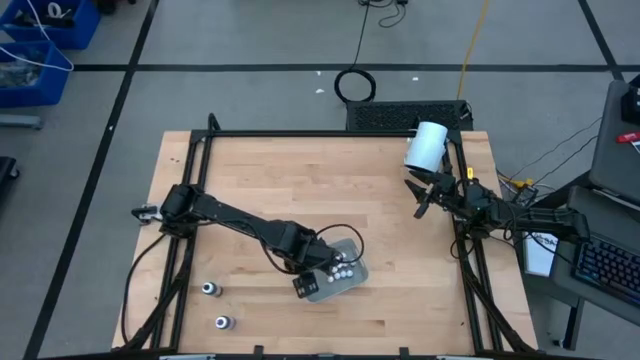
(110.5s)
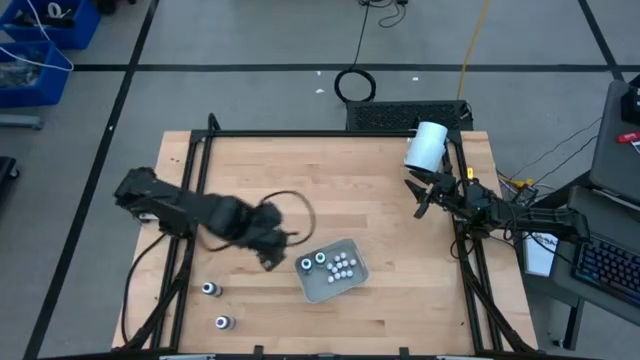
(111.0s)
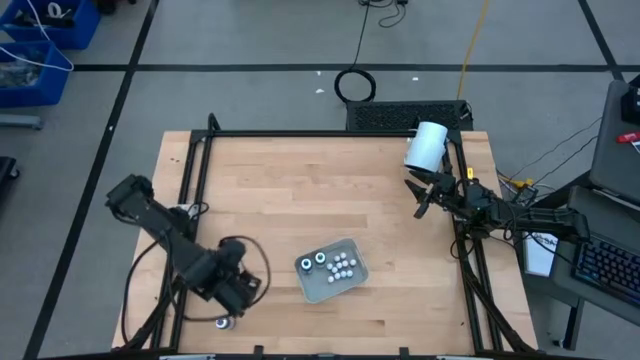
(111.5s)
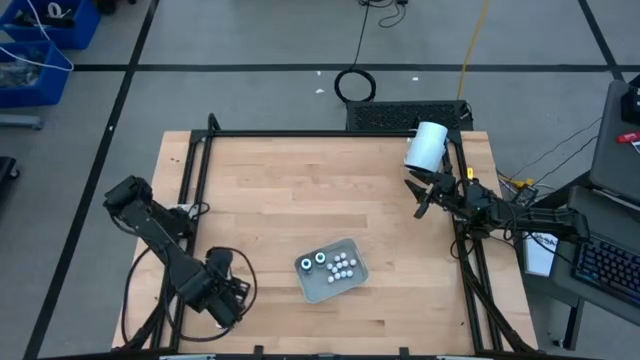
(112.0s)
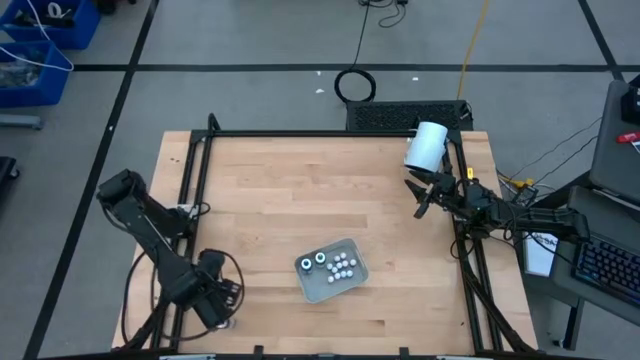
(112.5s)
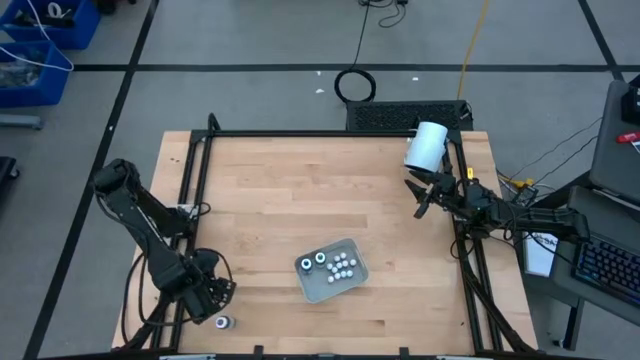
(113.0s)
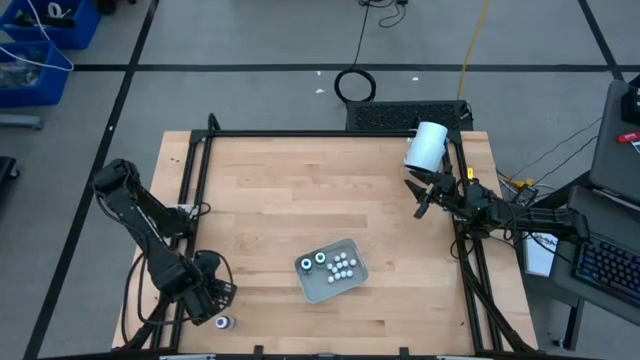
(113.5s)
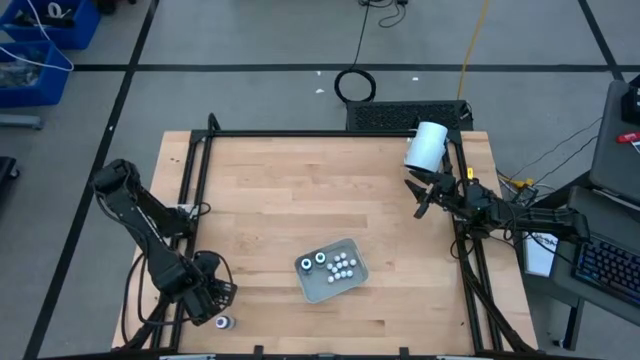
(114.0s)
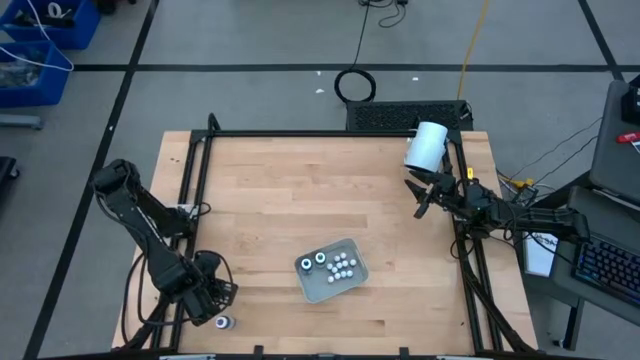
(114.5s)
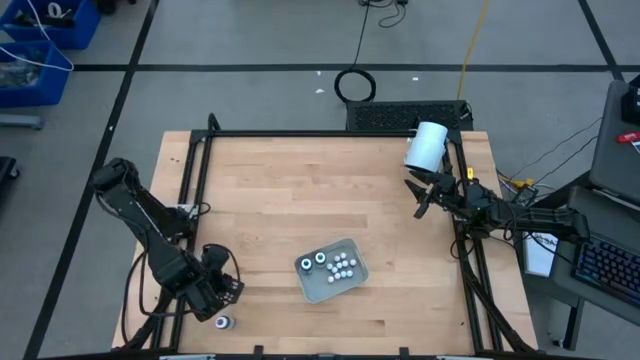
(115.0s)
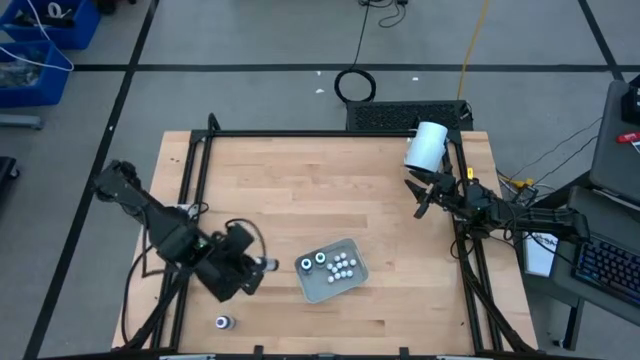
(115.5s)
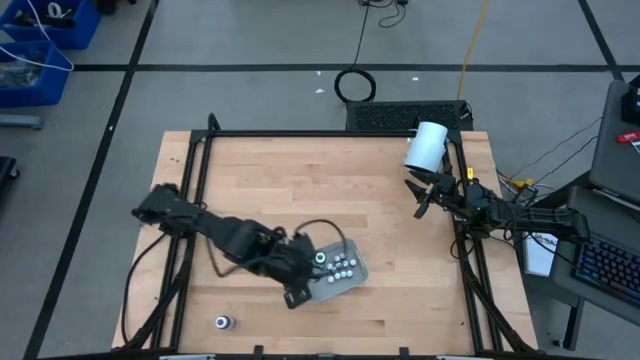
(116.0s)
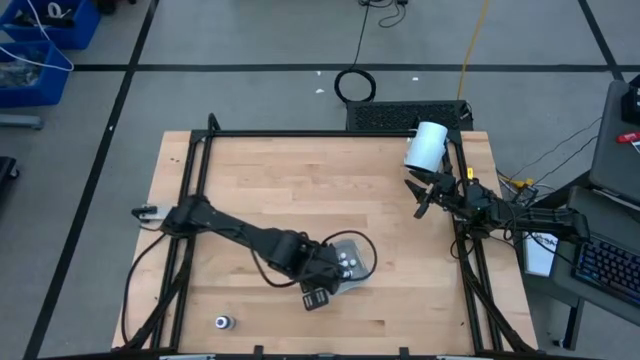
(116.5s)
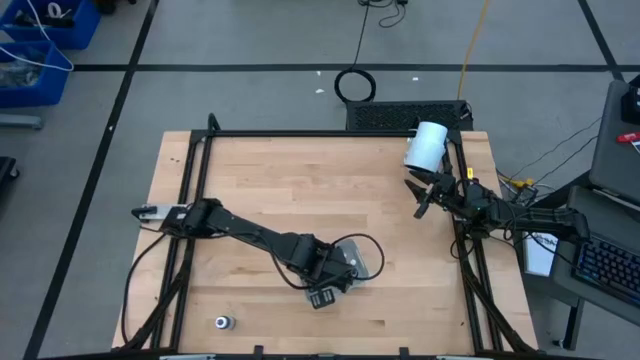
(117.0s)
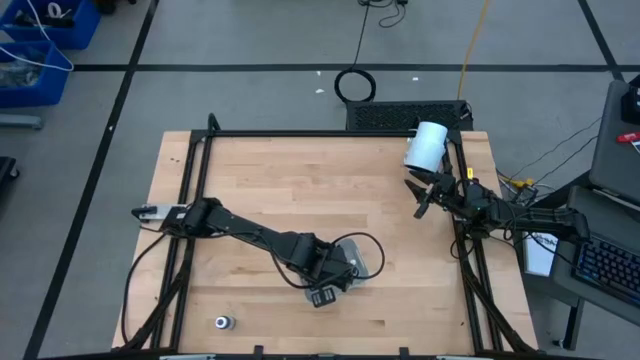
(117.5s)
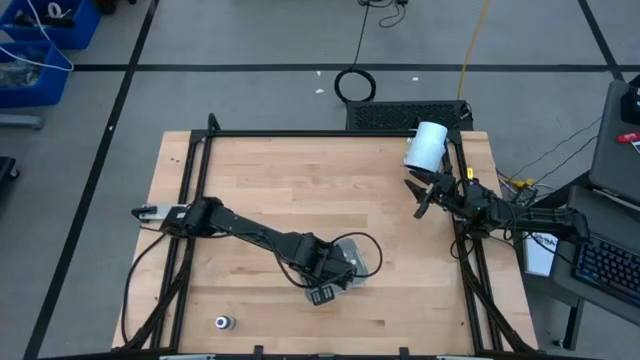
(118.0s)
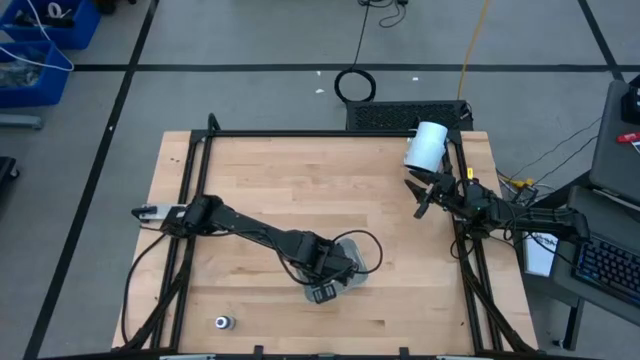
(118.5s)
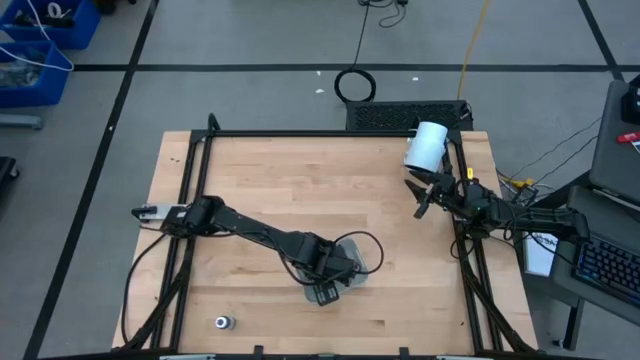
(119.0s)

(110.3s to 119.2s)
Task: Pick & Place food coloring
Put the large black food coloring bottle in the gray bin

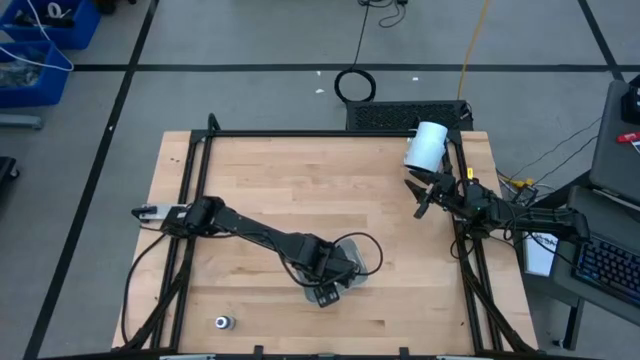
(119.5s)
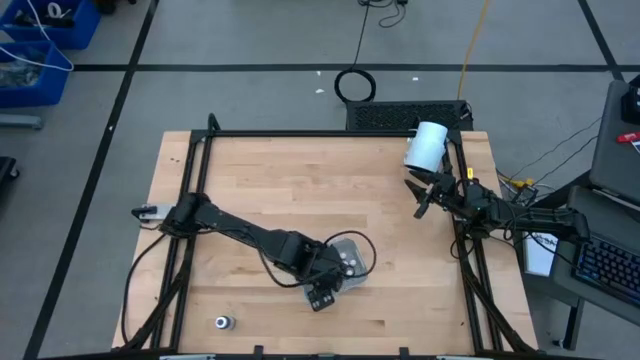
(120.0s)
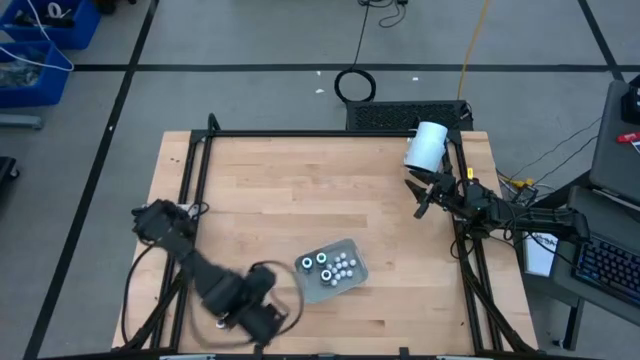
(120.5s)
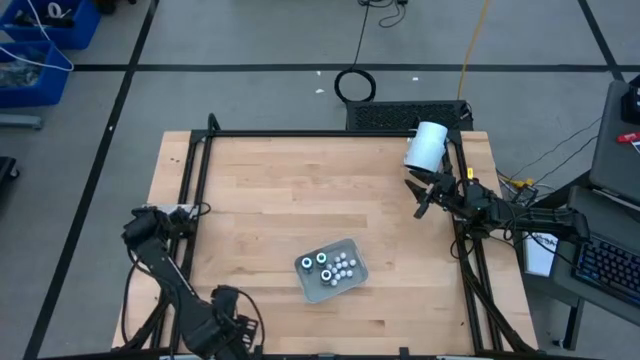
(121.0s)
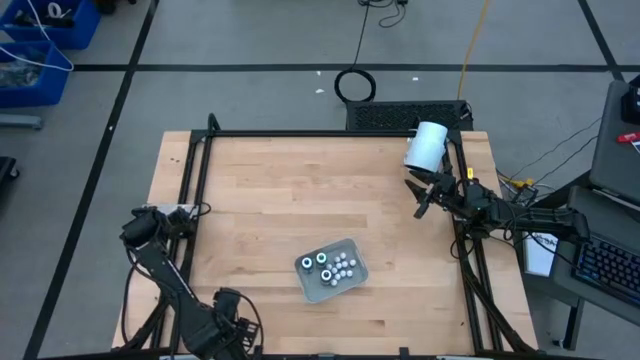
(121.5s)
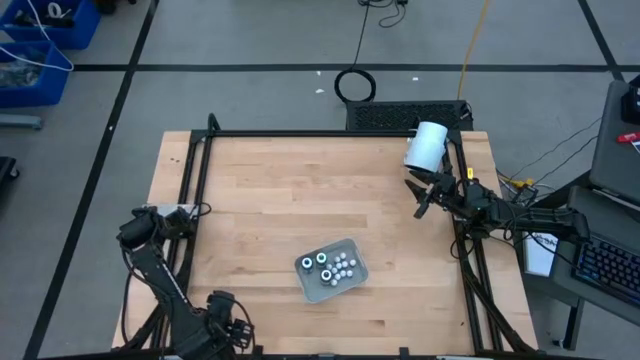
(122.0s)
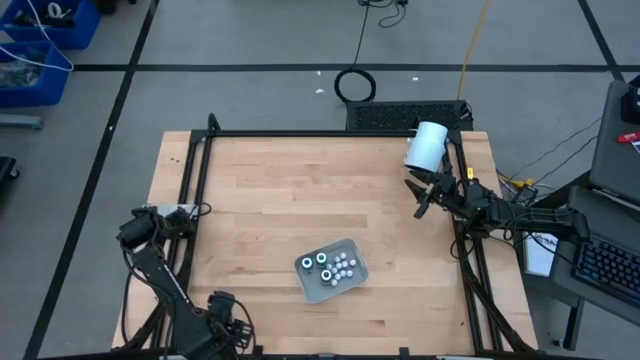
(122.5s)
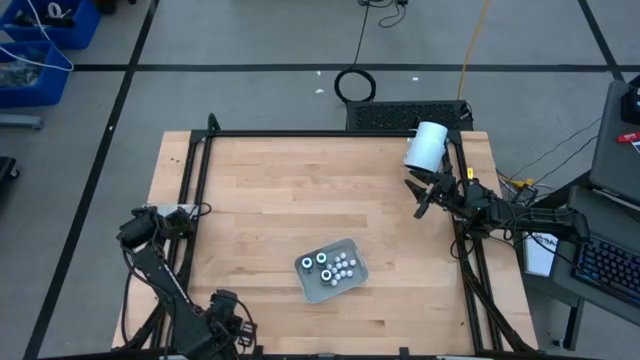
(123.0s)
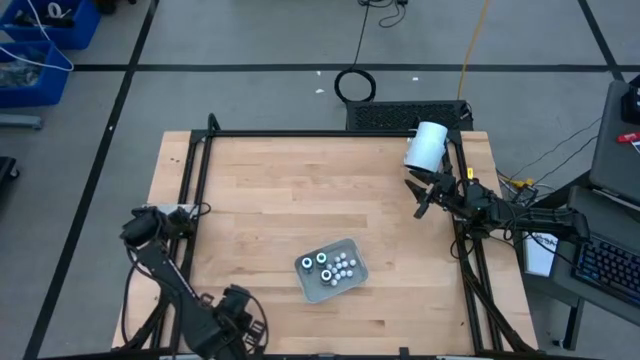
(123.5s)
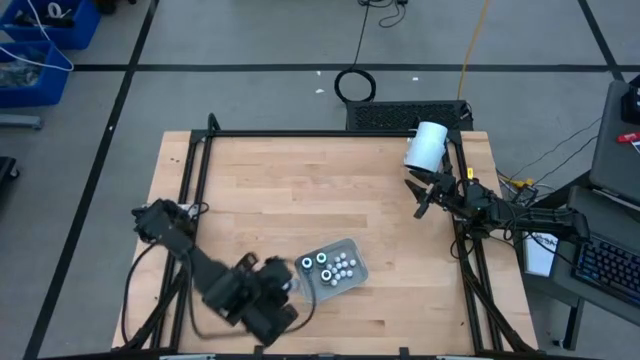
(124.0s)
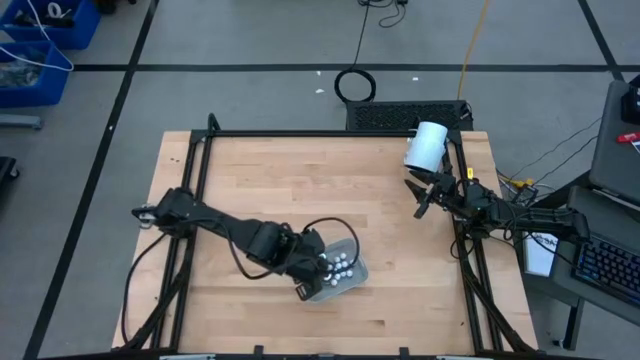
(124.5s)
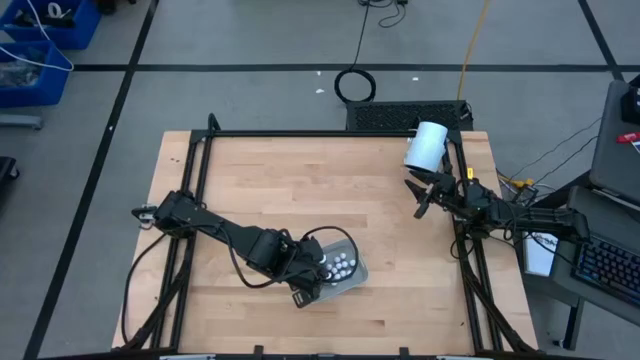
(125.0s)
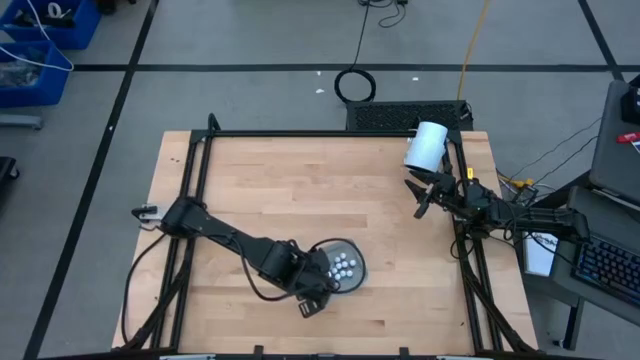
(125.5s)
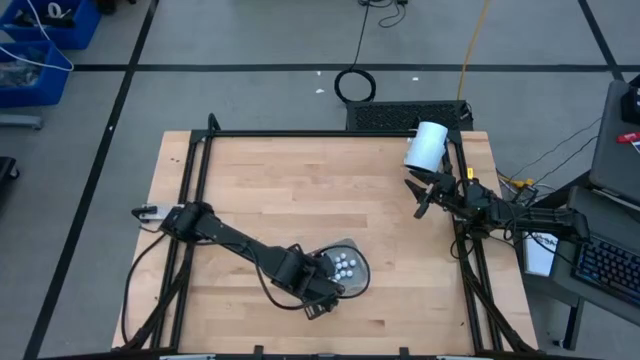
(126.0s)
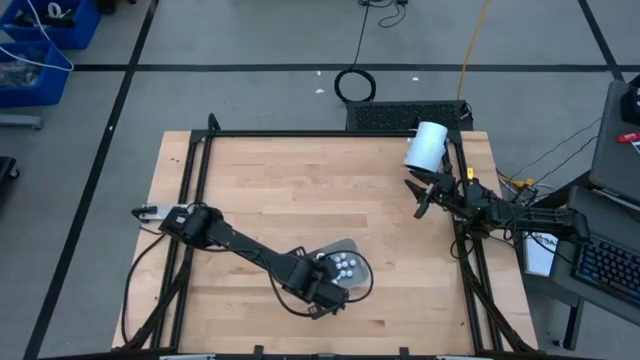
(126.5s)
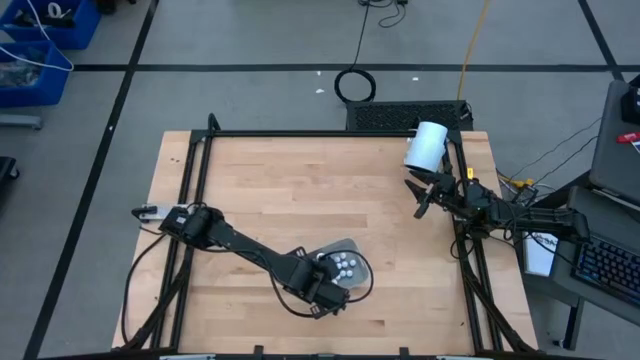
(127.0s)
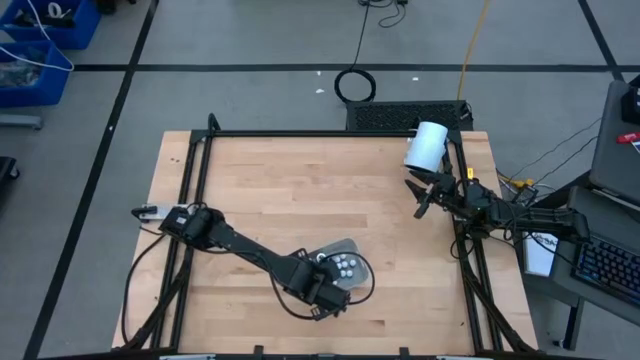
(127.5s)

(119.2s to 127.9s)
Put the large violet food coloring bottle in the gray bin

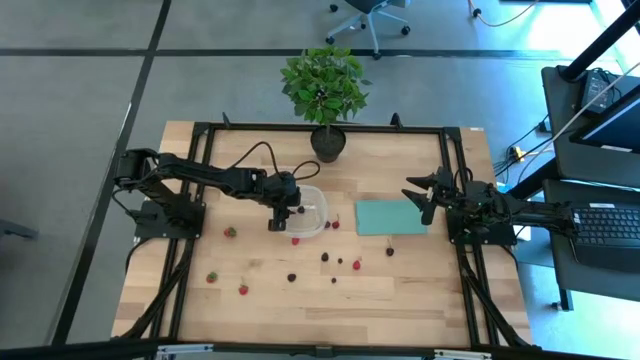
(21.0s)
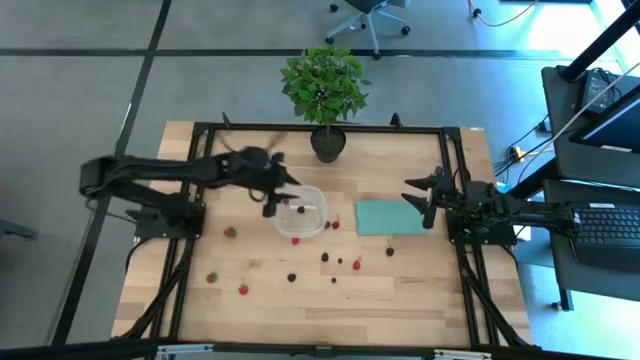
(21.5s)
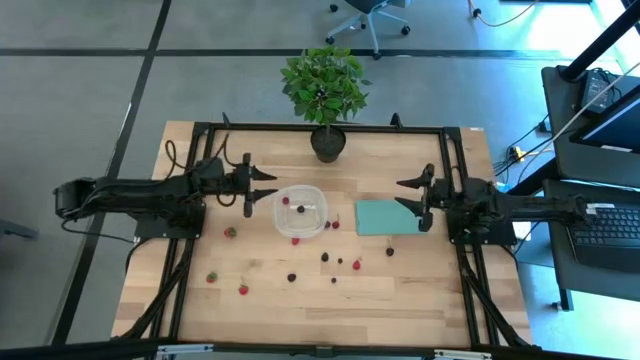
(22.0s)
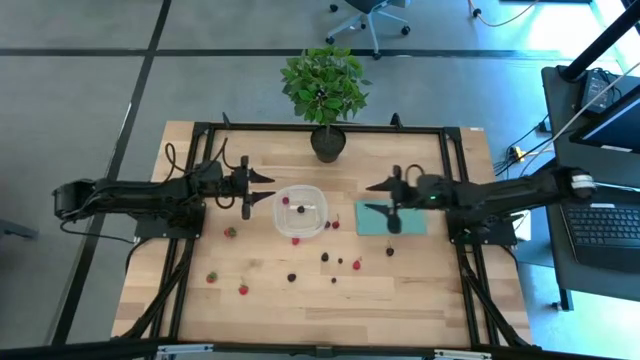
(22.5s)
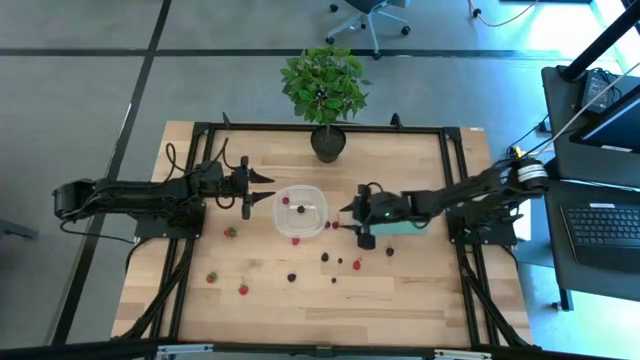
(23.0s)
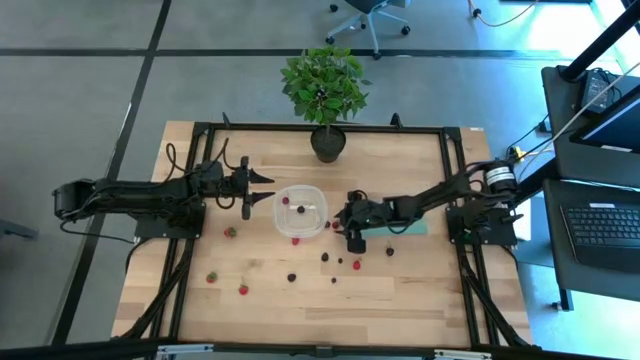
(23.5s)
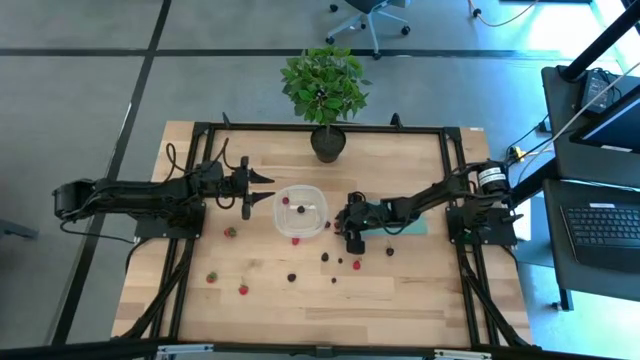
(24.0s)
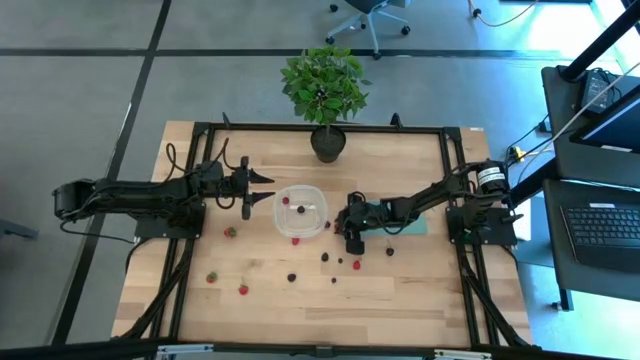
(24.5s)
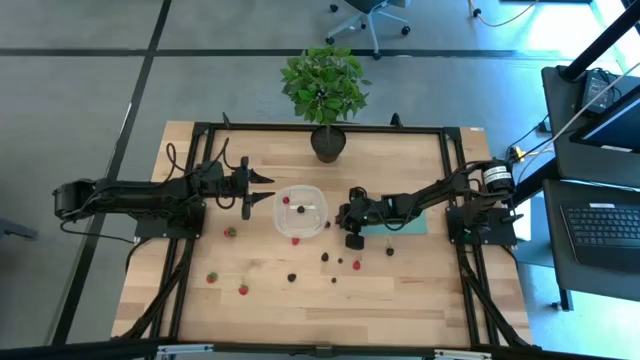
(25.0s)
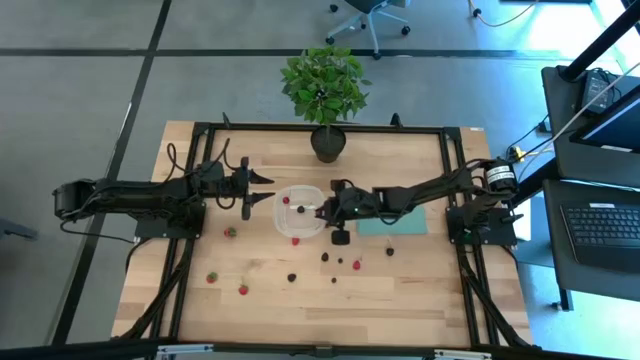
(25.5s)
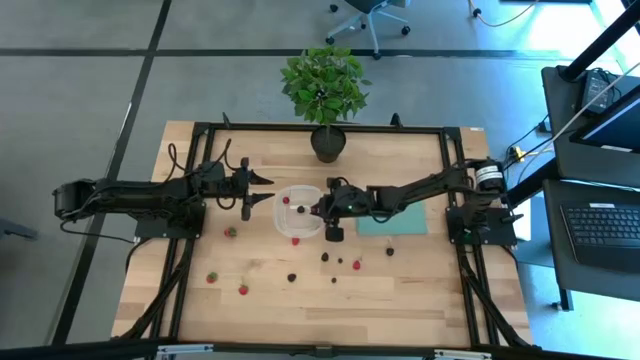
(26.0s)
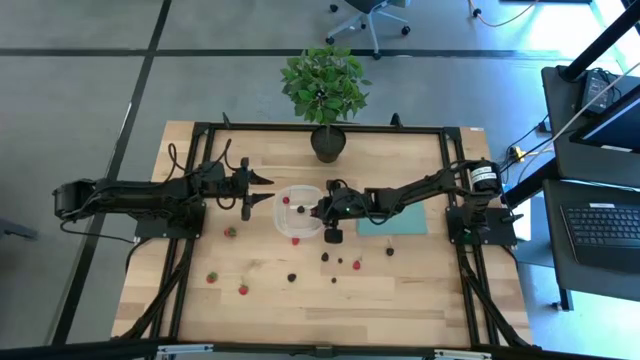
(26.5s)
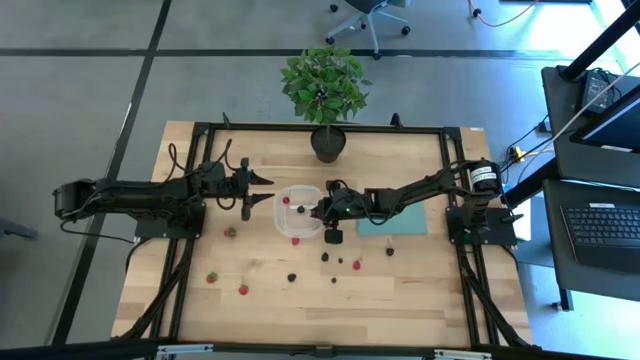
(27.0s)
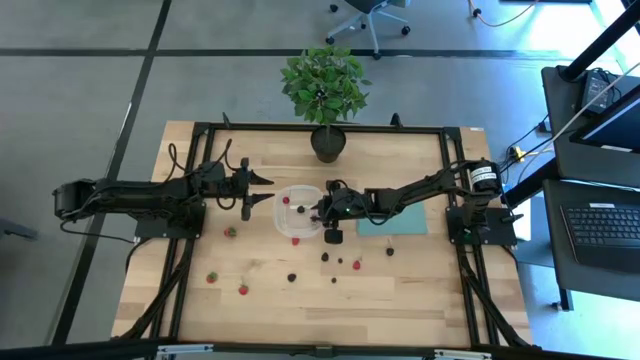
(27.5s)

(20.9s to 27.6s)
Task: Pick and placing Produce into tupperware
Put the right red cherry into the container
